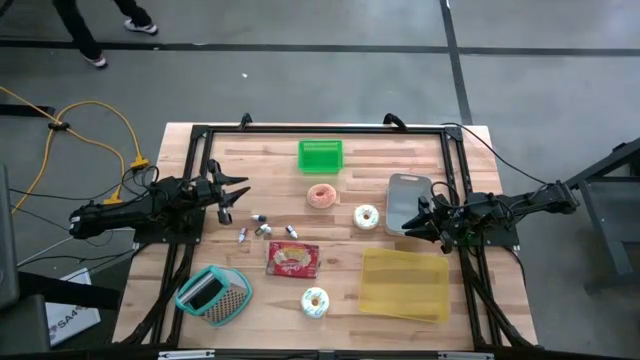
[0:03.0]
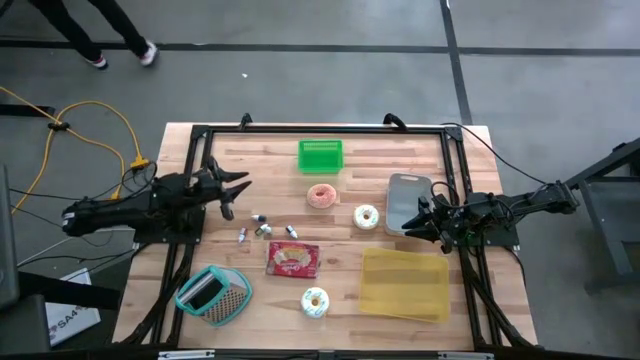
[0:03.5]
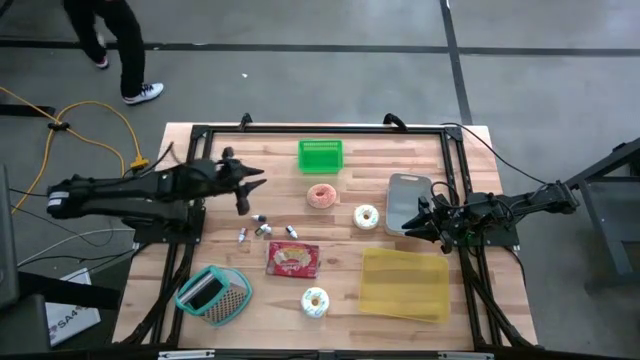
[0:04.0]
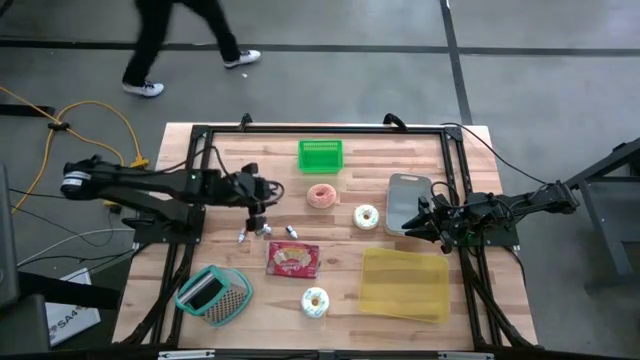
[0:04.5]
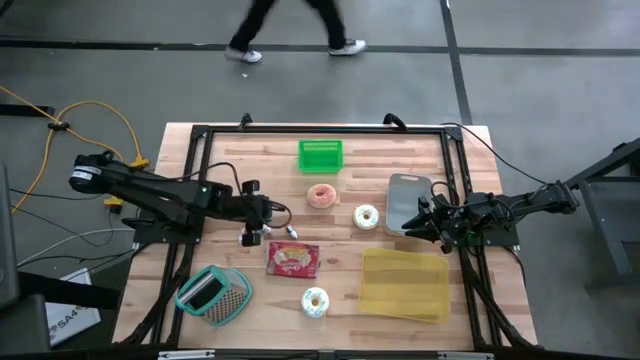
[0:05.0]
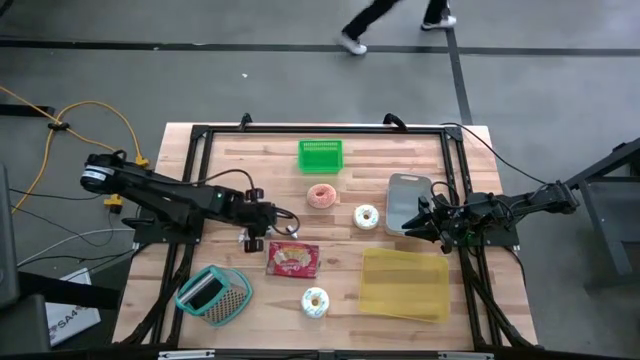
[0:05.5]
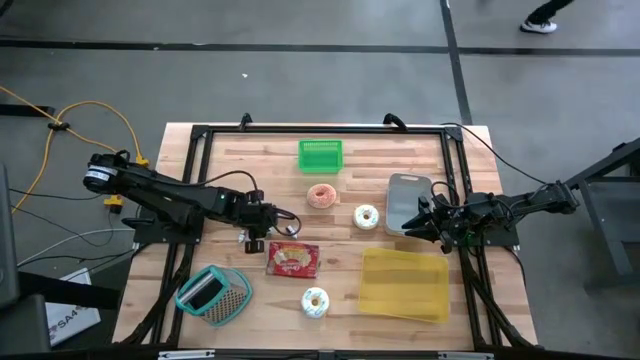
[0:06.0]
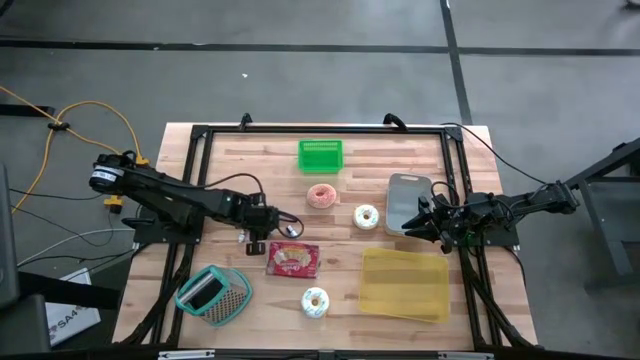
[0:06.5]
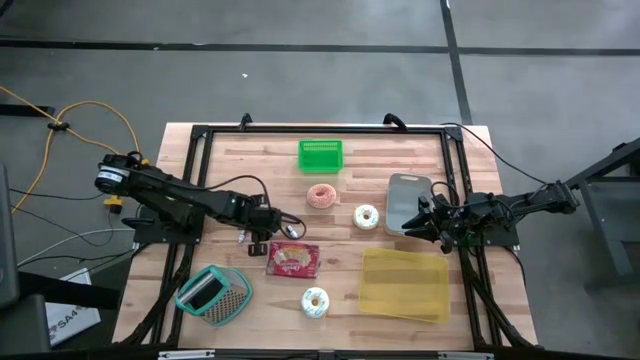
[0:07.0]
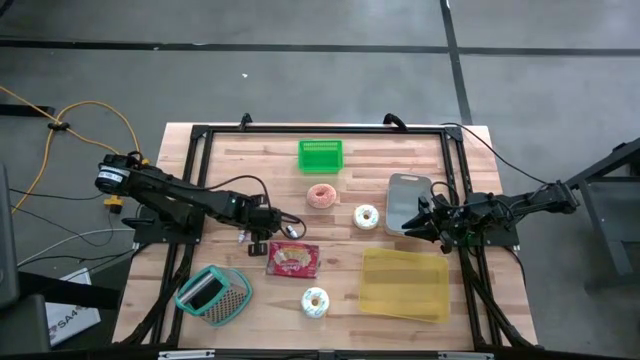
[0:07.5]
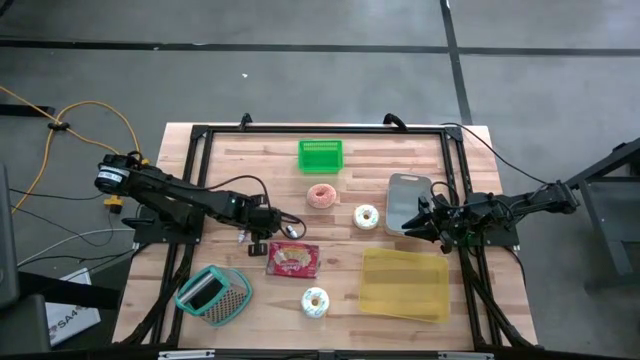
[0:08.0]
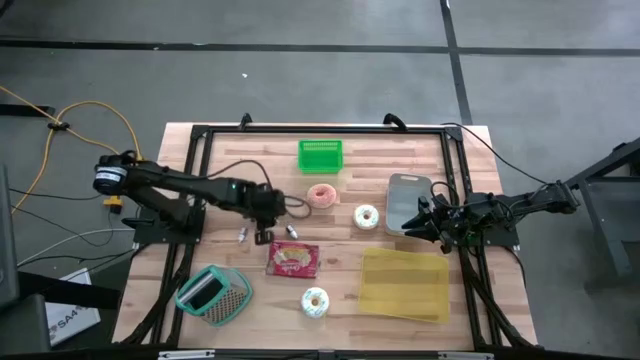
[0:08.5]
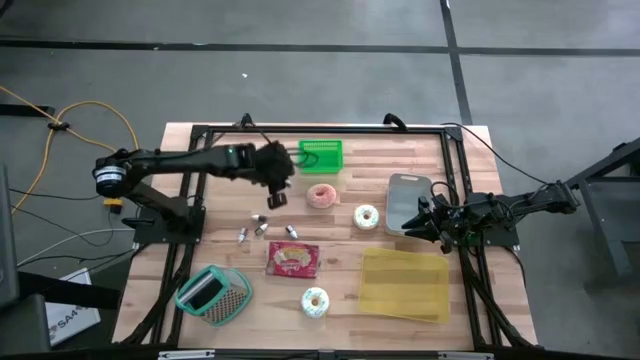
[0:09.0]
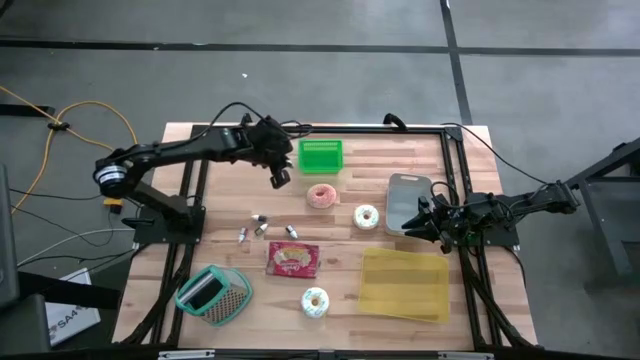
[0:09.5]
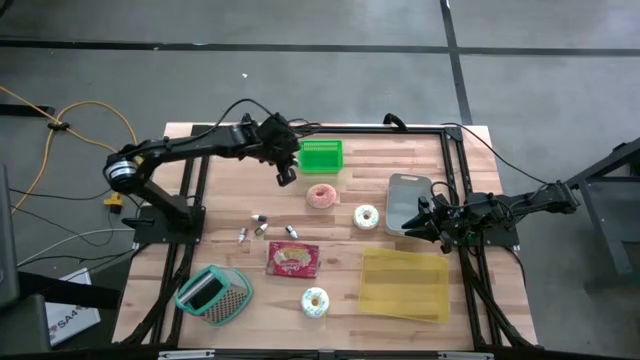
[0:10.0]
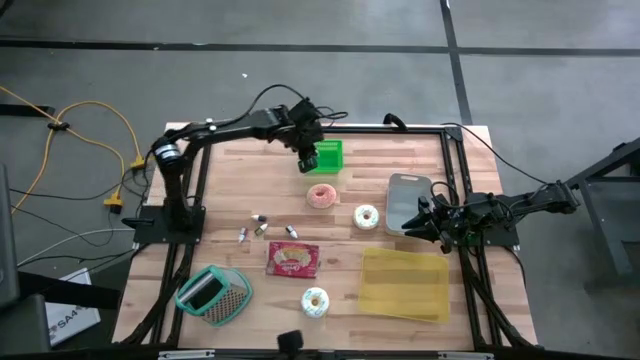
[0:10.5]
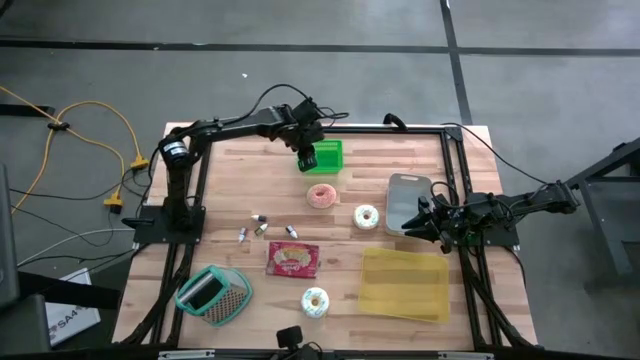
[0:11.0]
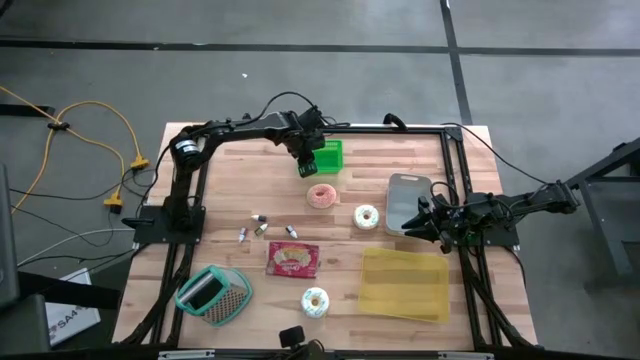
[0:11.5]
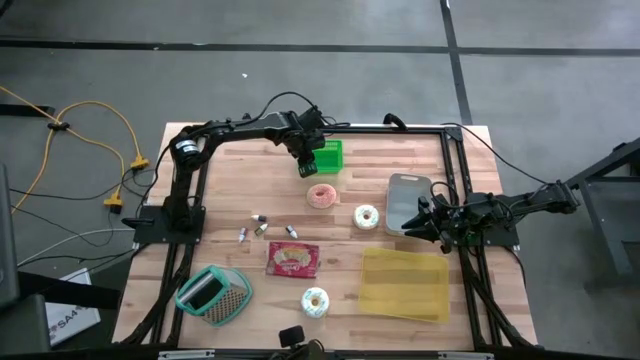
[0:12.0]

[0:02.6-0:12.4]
Put the blue food coloring bottle into the green bin

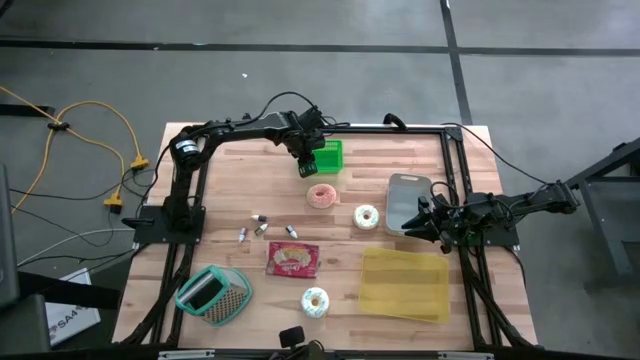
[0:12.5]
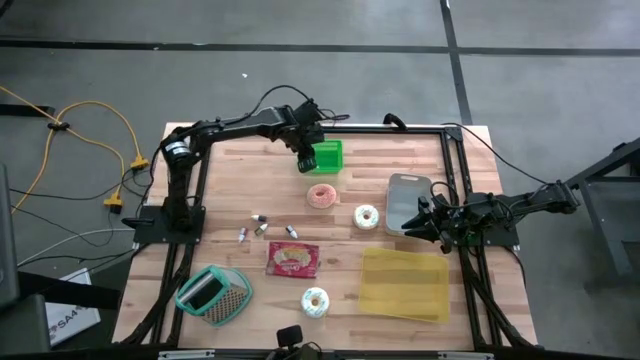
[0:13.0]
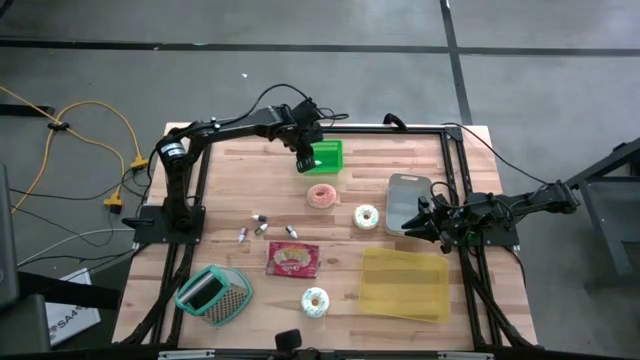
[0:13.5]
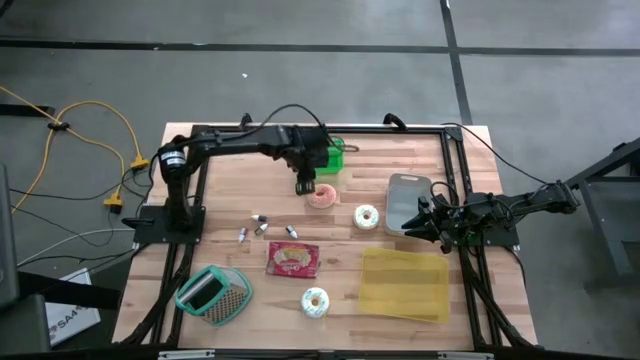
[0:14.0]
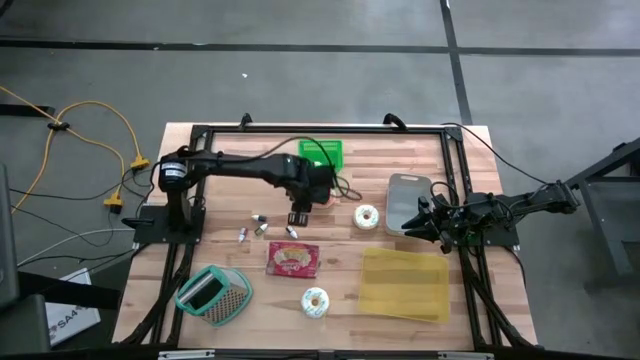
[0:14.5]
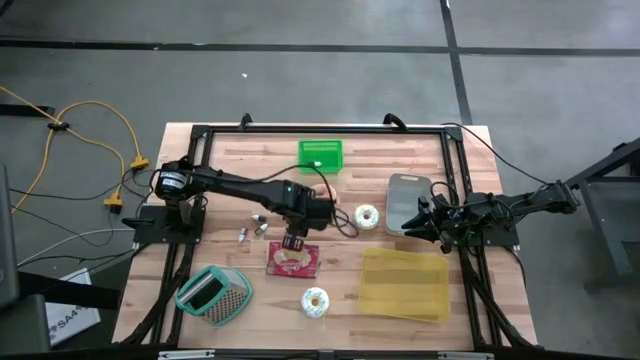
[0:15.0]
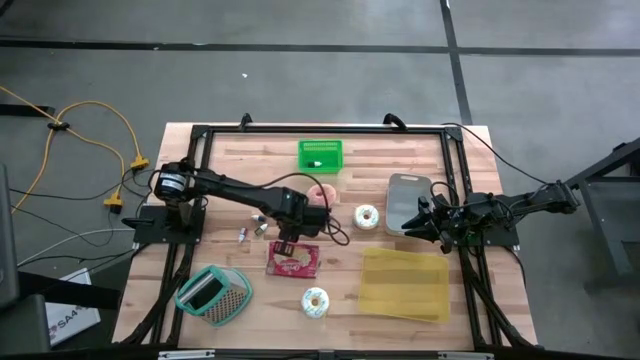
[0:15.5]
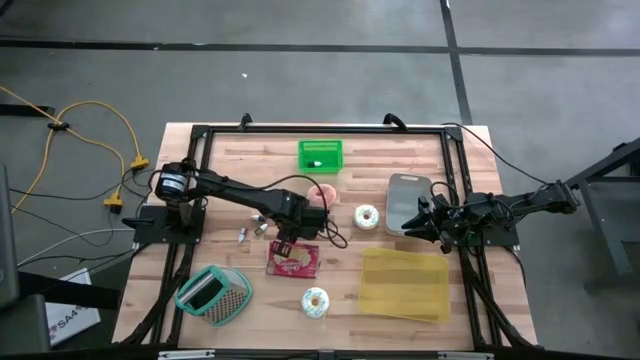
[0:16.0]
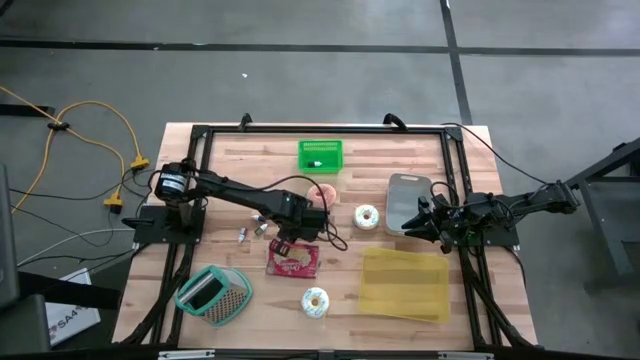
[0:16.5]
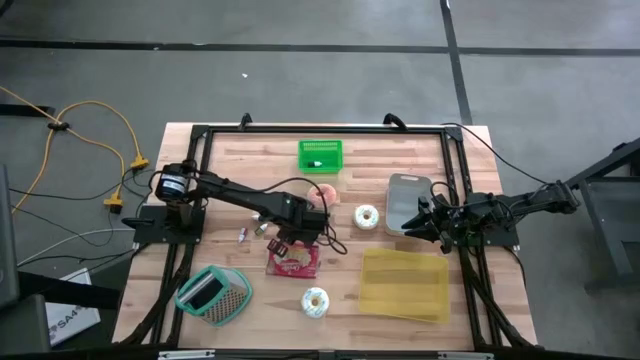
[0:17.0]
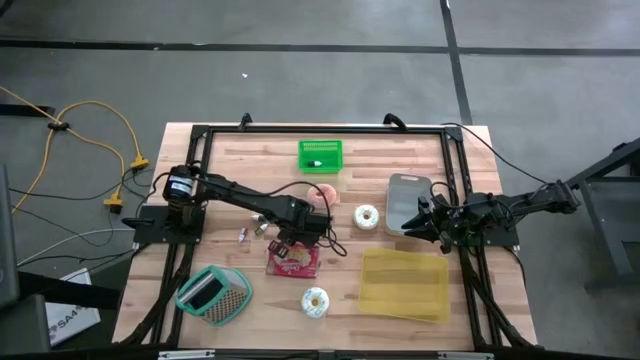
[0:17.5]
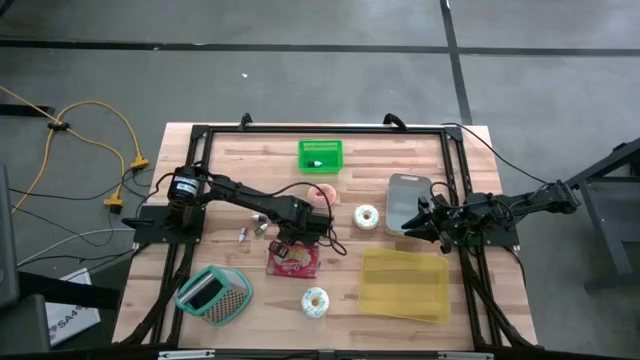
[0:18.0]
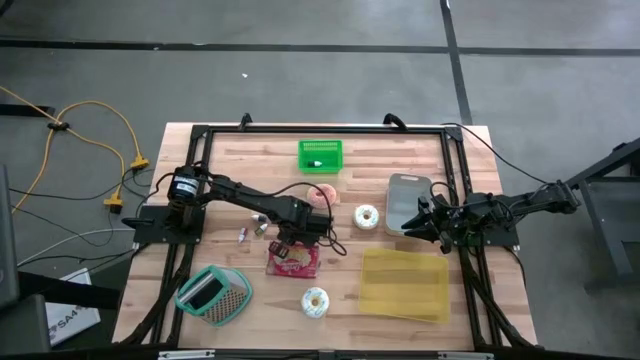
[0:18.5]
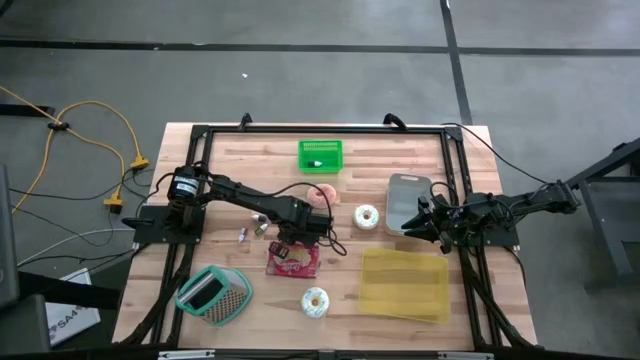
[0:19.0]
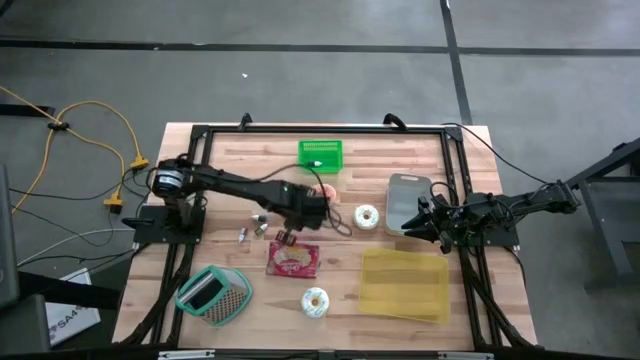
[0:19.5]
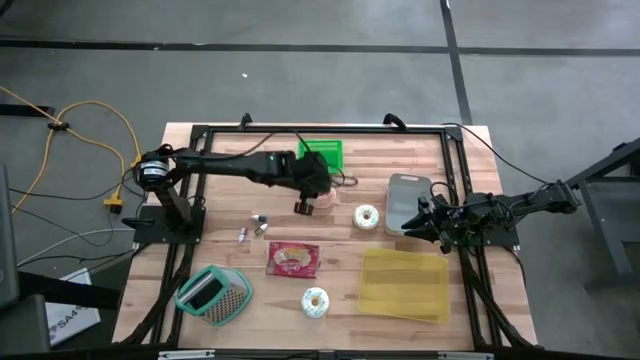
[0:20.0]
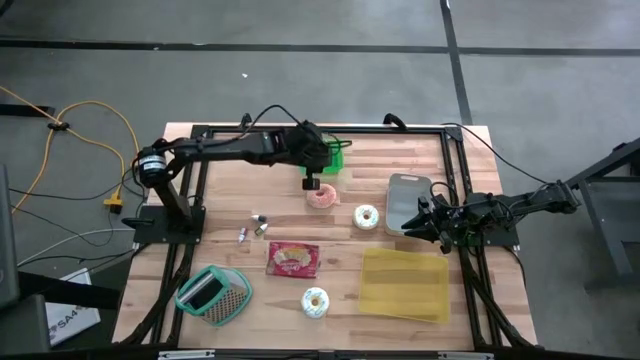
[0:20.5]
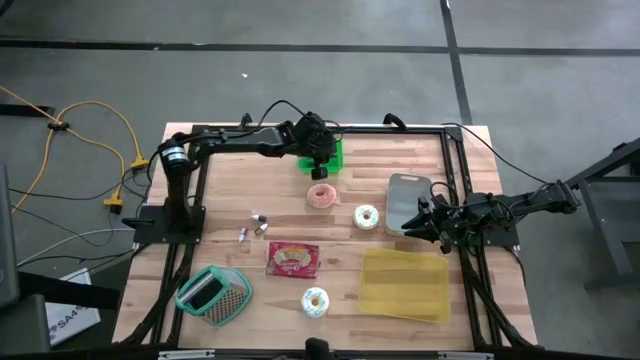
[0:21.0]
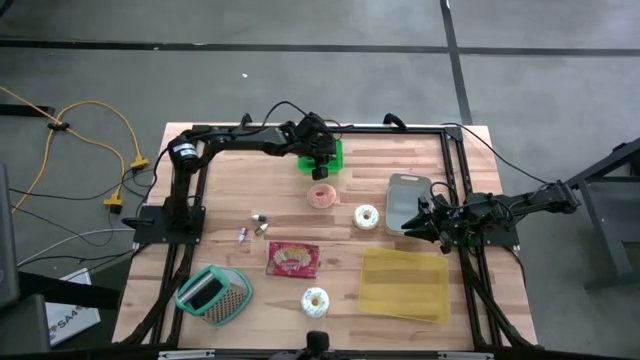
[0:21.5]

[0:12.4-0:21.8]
Put the light blue food coloring bottle into the green bin
